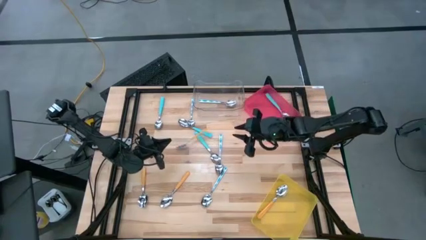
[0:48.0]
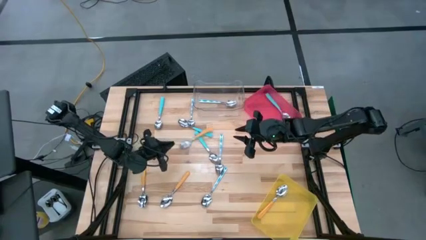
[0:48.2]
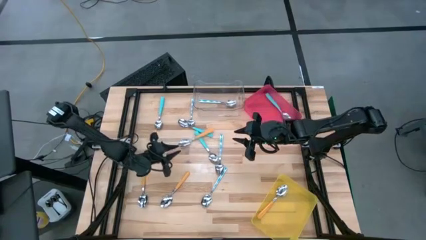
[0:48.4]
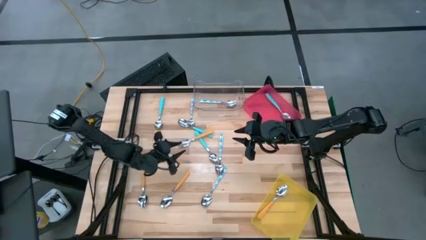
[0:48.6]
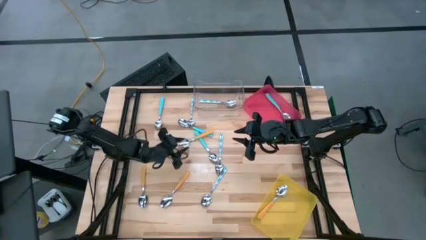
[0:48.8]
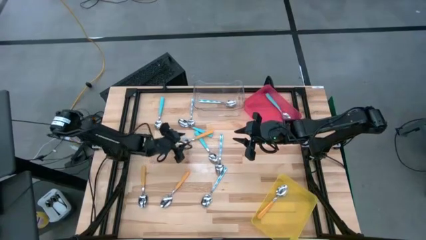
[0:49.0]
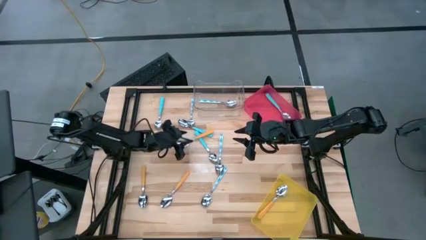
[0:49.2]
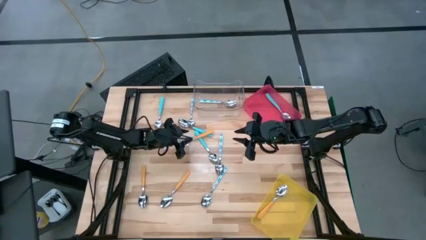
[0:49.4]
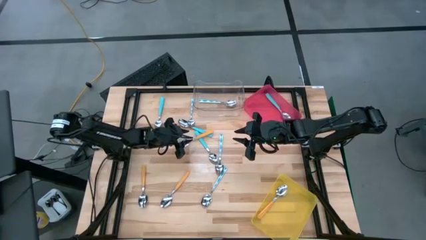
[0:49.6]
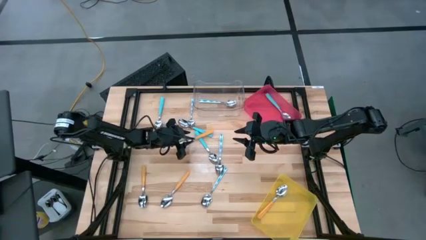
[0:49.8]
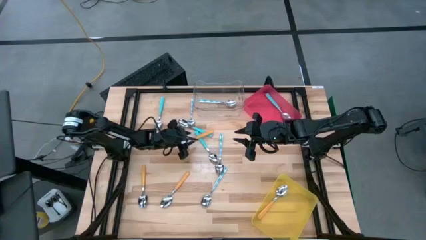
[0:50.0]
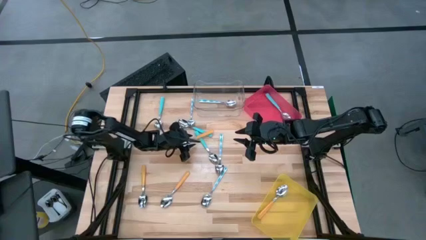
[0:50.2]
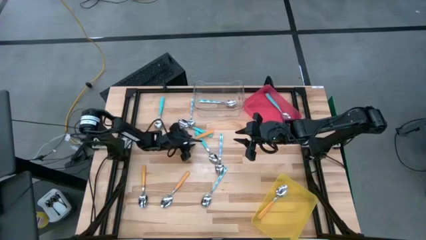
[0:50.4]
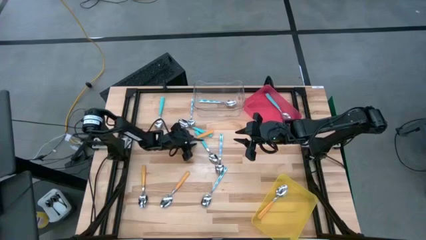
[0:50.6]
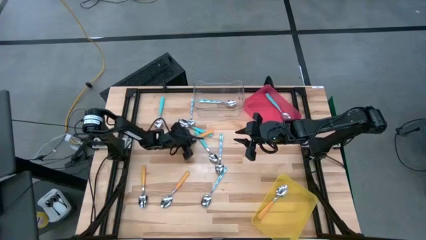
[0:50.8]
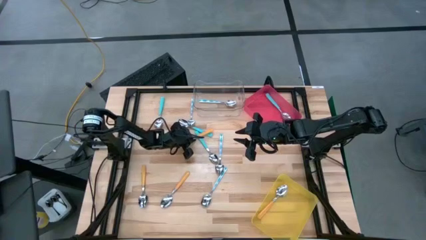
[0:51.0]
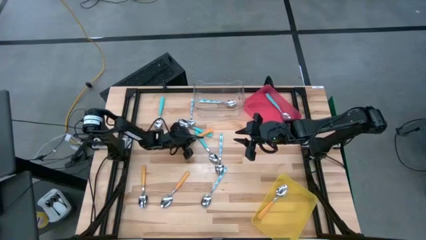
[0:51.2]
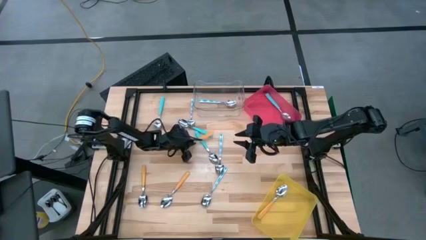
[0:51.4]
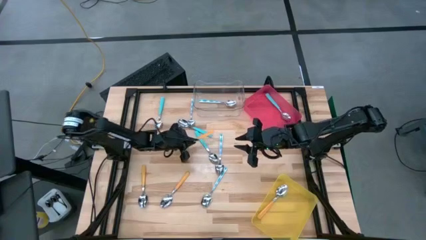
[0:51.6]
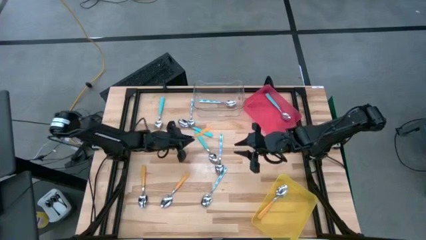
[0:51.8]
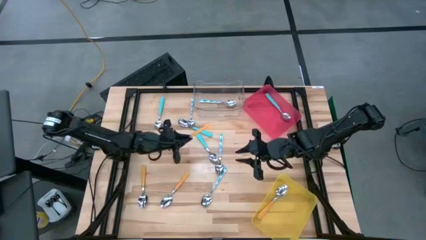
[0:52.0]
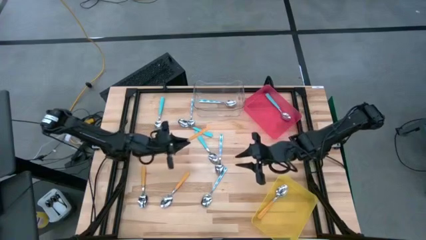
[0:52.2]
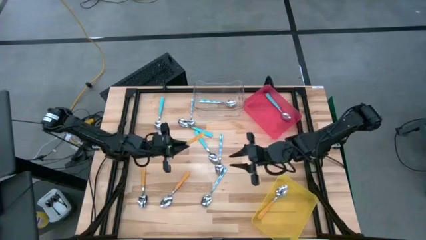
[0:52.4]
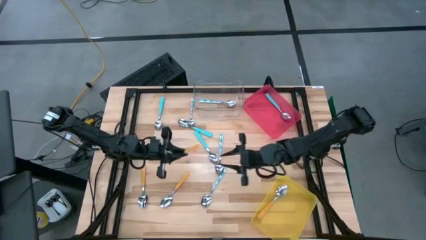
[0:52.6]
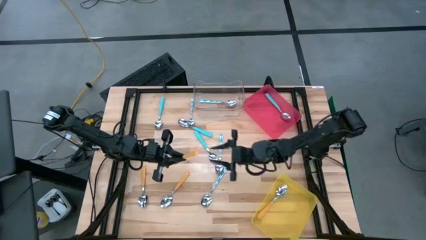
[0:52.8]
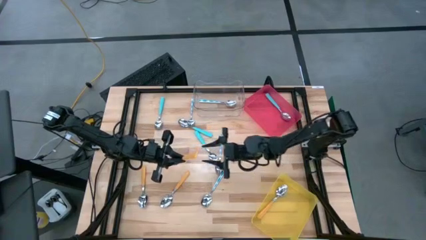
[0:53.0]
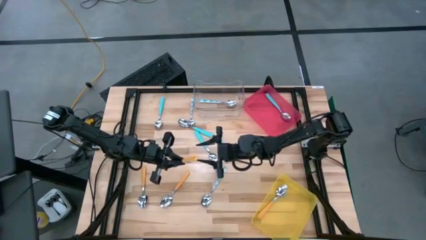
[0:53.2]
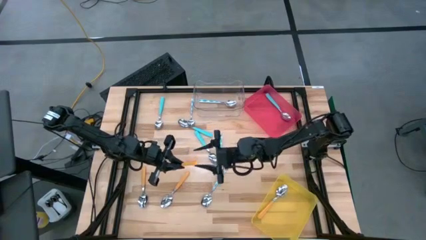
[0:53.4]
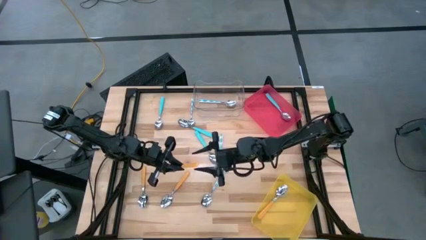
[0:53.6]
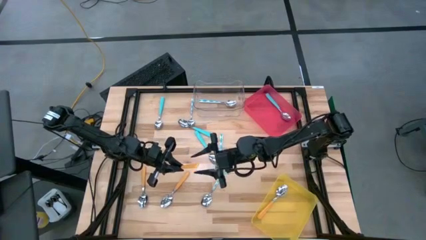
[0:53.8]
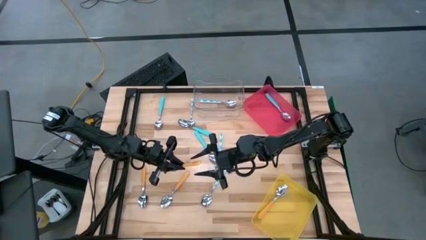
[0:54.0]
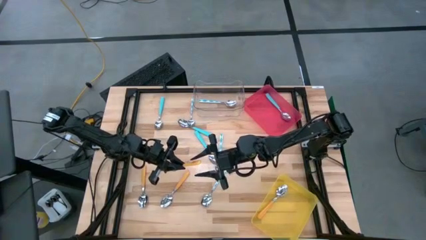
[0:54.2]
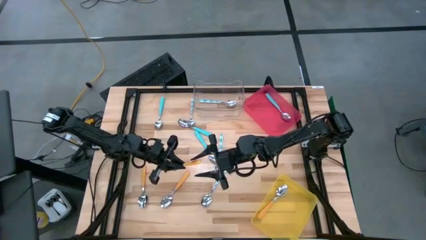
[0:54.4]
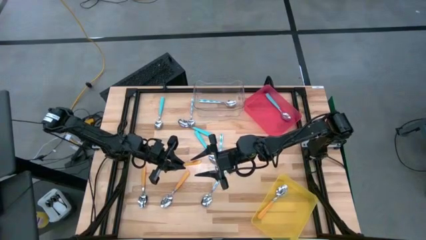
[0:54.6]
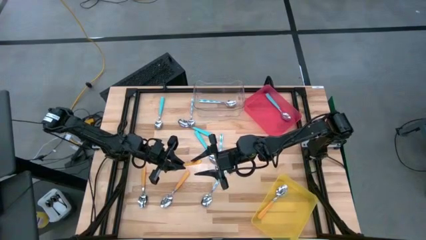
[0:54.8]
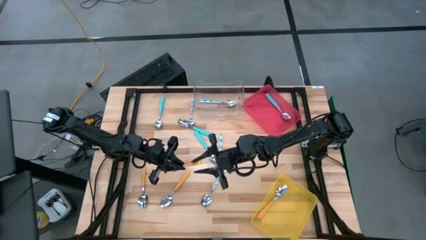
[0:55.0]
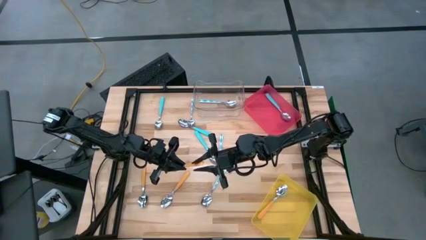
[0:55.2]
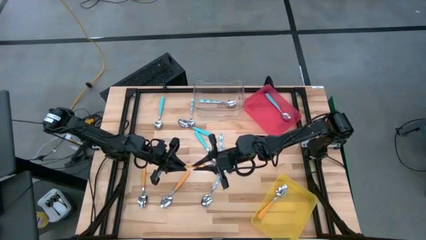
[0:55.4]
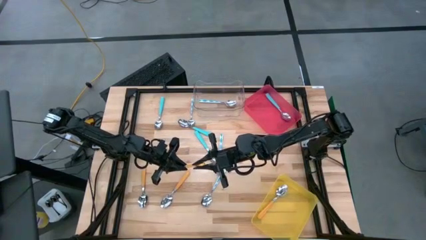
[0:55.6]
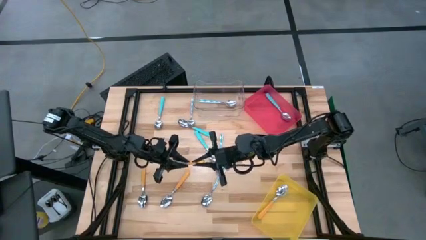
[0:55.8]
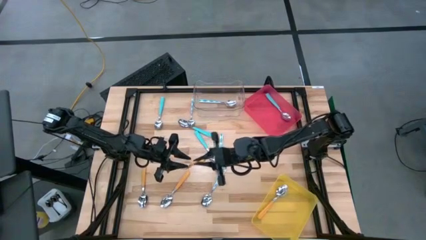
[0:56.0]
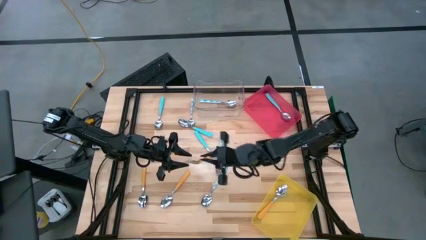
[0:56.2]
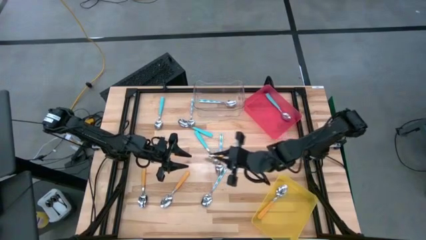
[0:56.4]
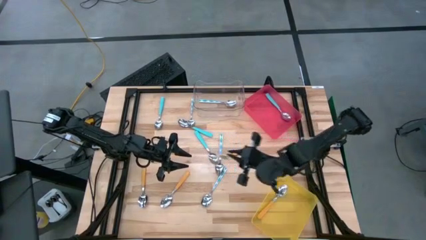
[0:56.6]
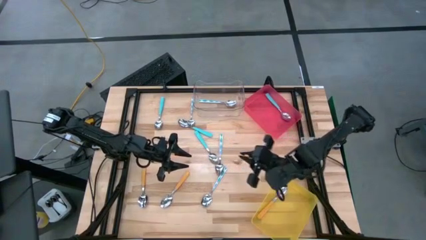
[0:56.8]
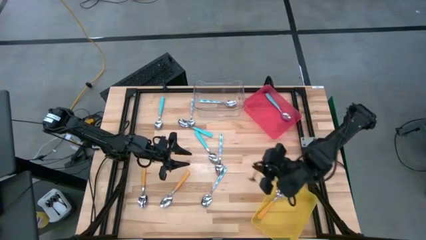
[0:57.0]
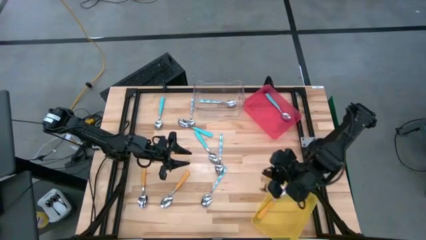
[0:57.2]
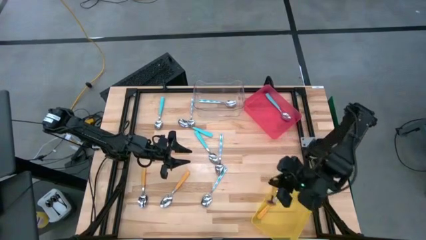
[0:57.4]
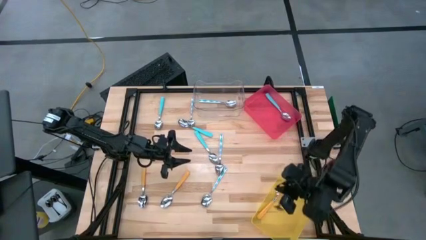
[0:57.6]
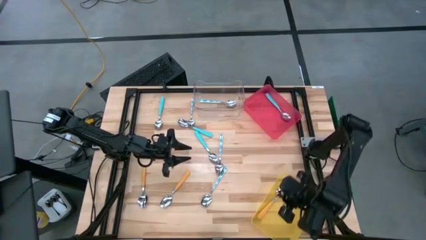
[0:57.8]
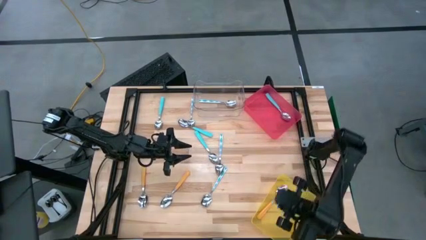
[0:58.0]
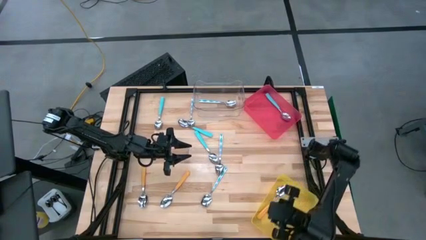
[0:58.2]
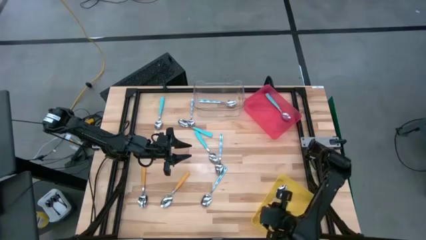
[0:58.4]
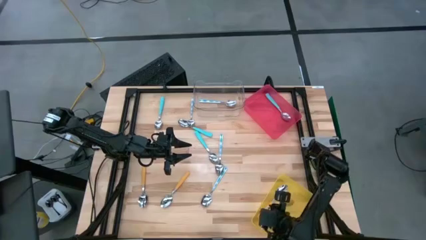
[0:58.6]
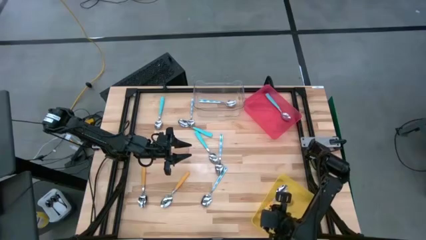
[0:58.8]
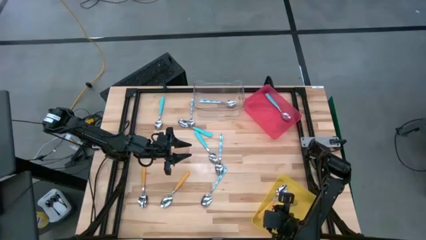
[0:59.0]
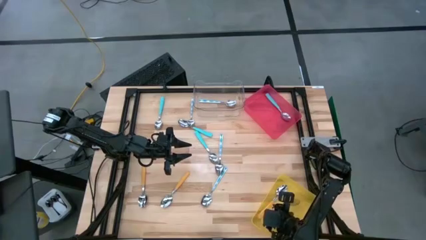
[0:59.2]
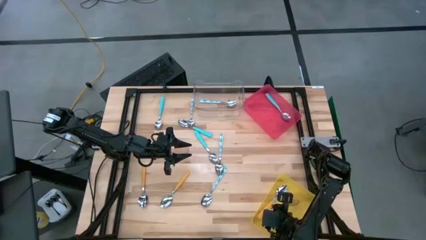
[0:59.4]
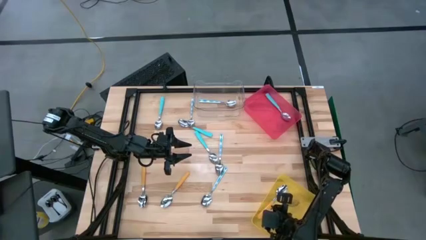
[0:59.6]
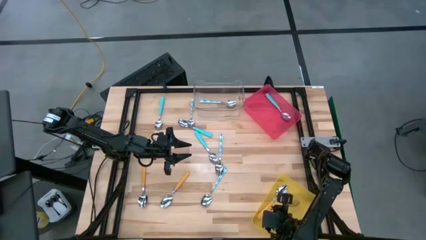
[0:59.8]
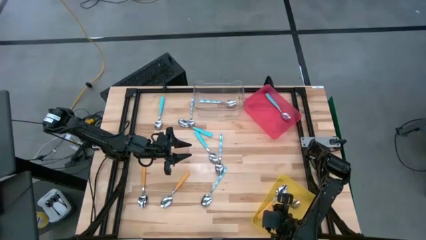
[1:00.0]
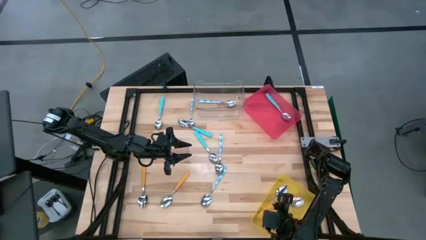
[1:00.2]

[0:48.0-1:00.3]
Task: Sort silverware by color (type)
Put the orange spoon into the yellow bin
